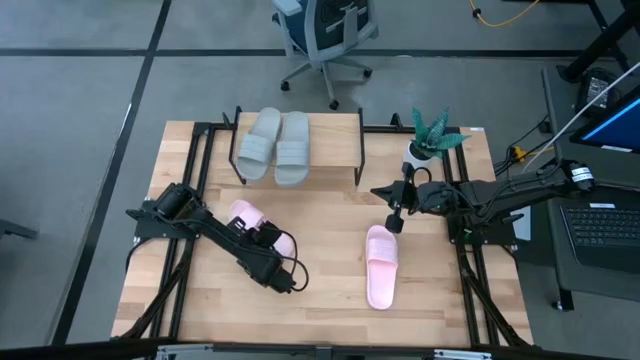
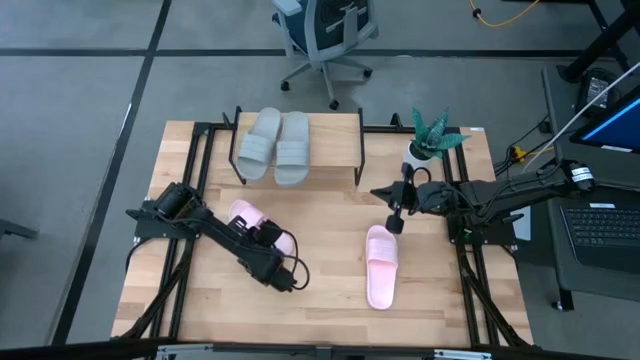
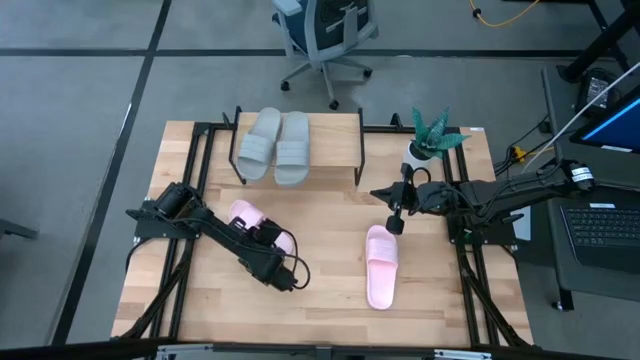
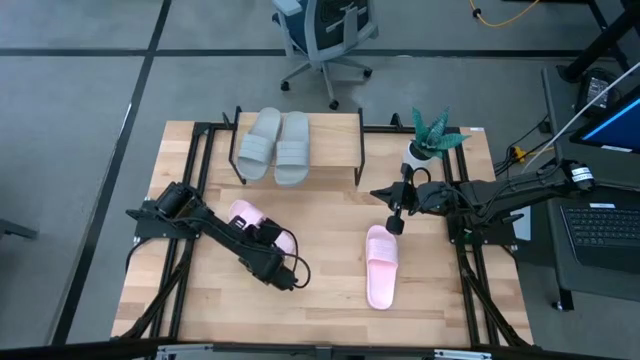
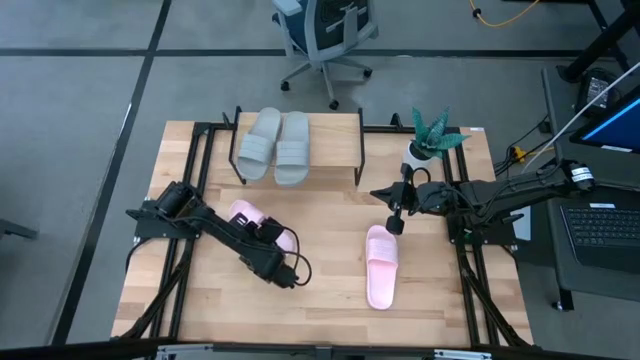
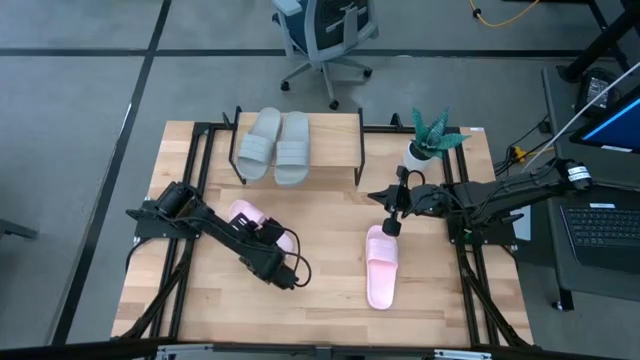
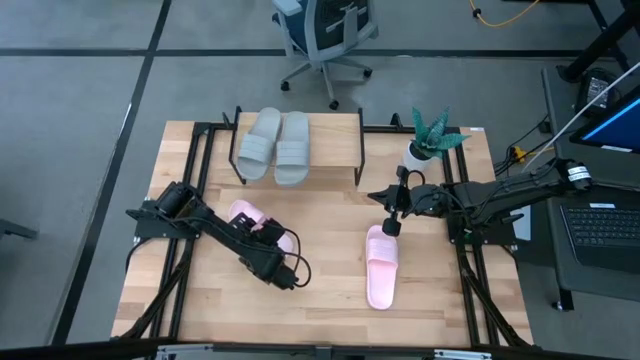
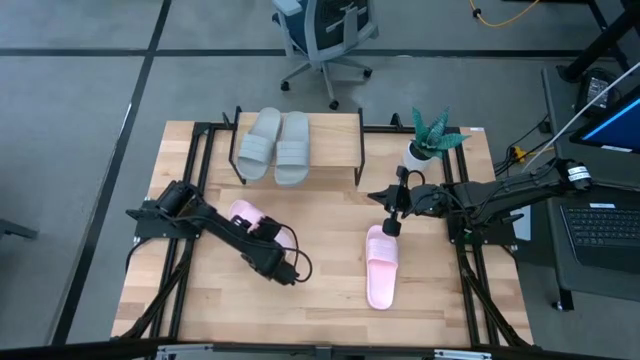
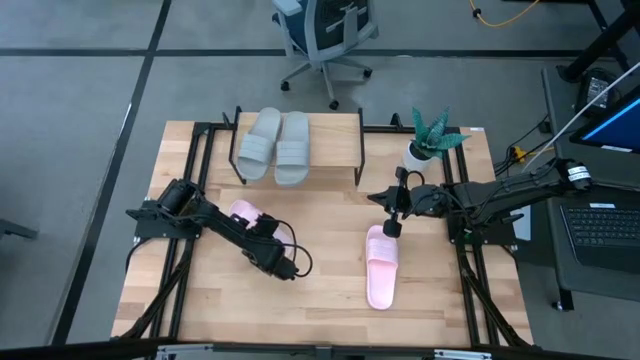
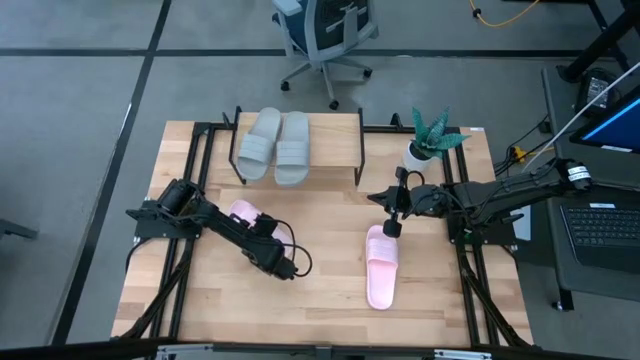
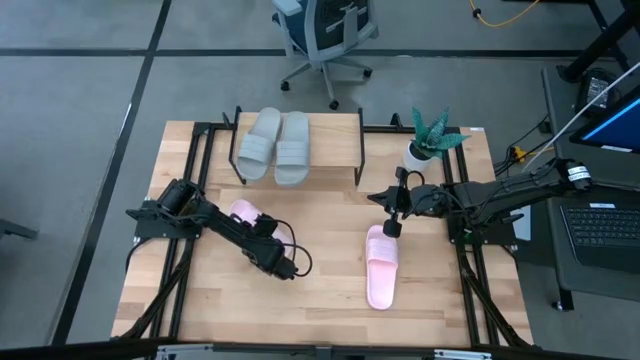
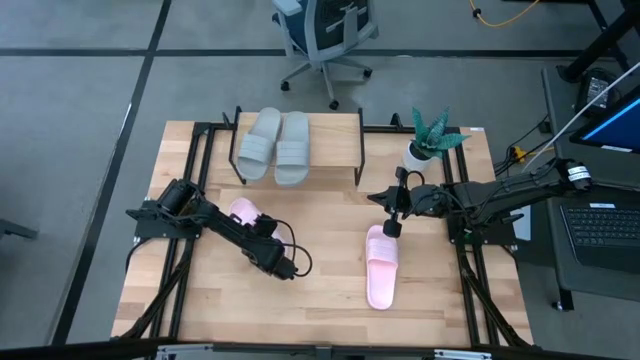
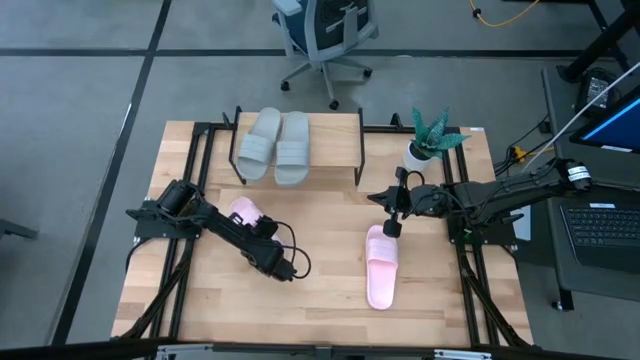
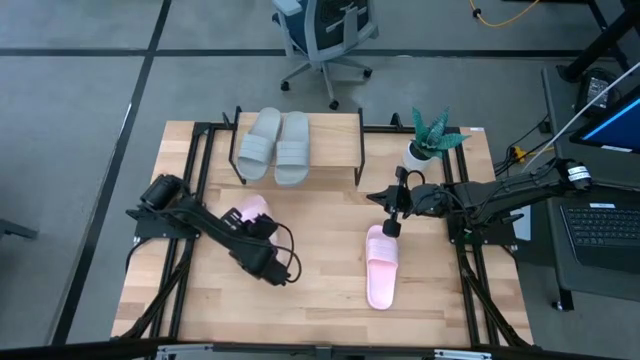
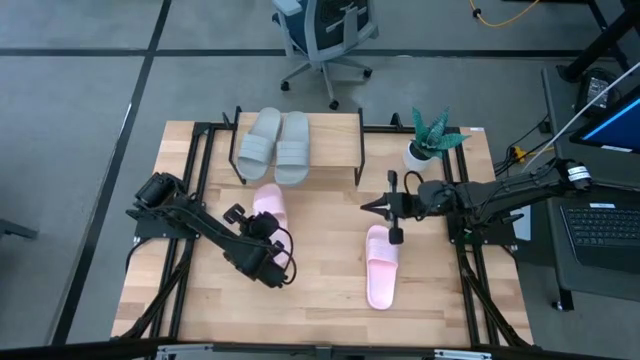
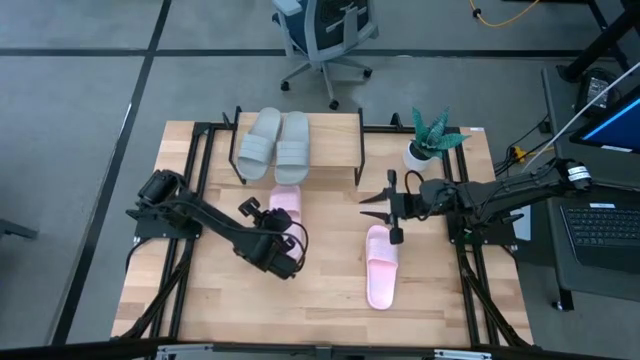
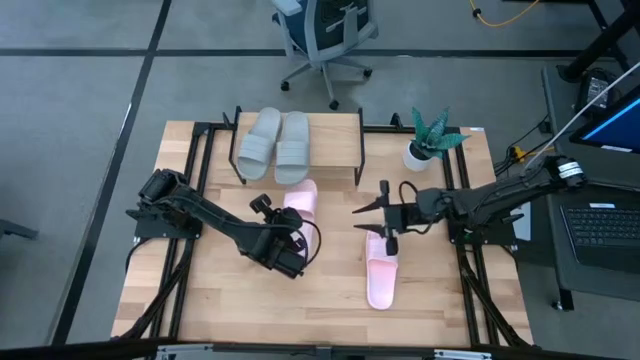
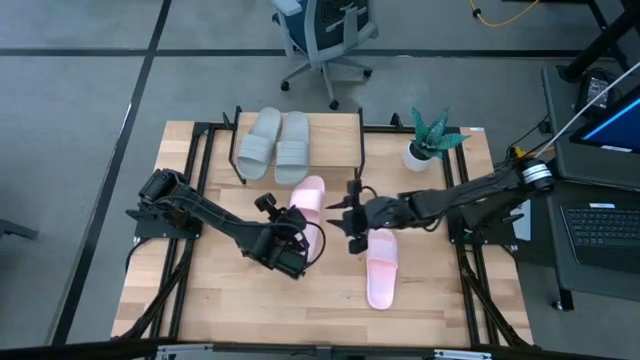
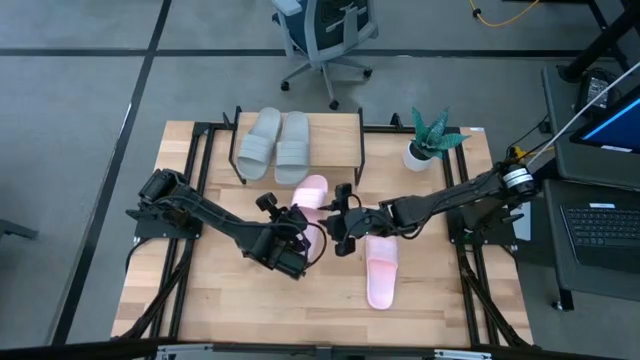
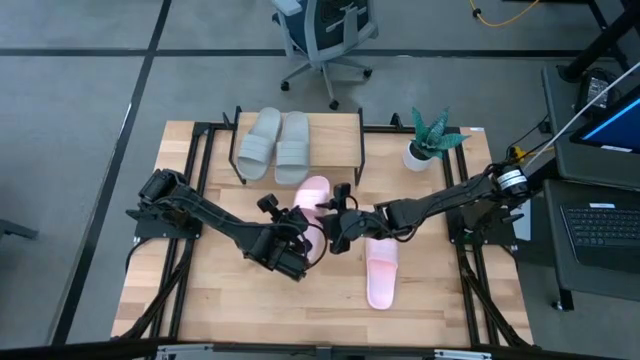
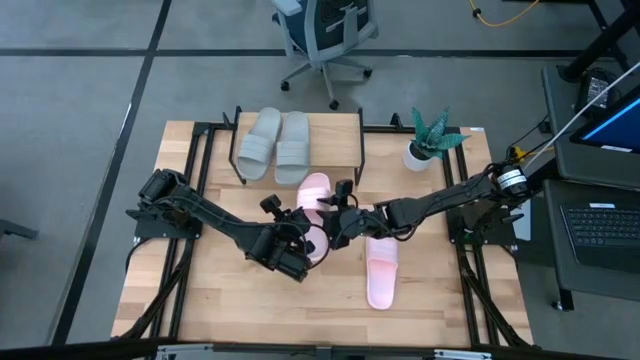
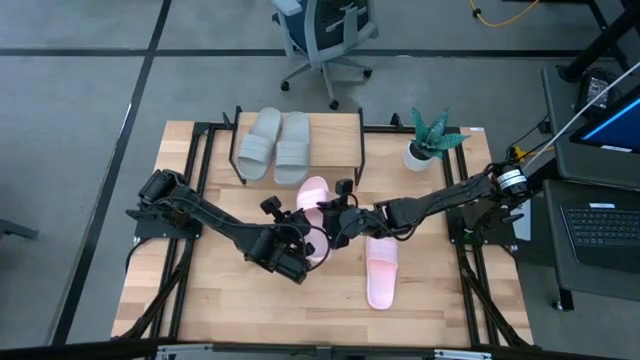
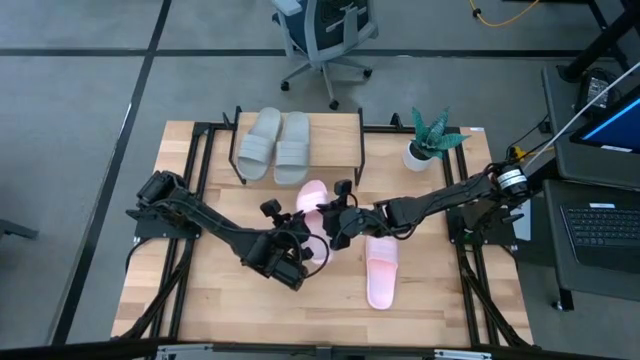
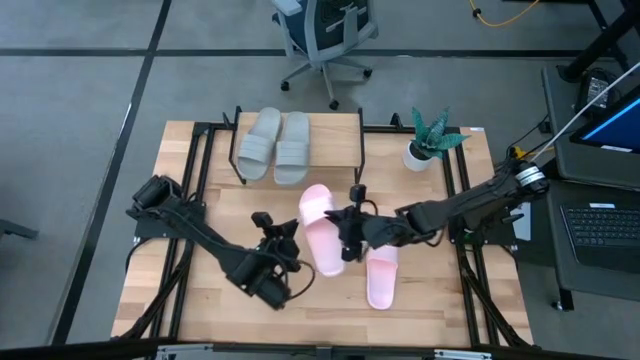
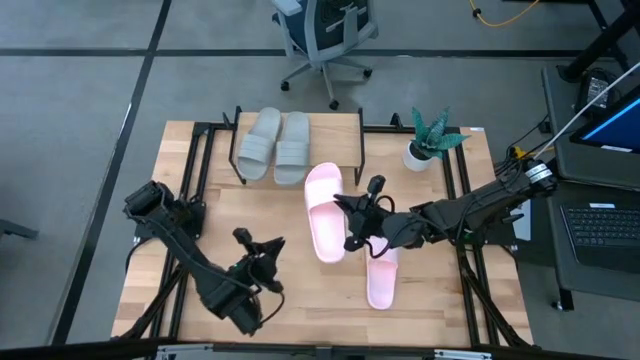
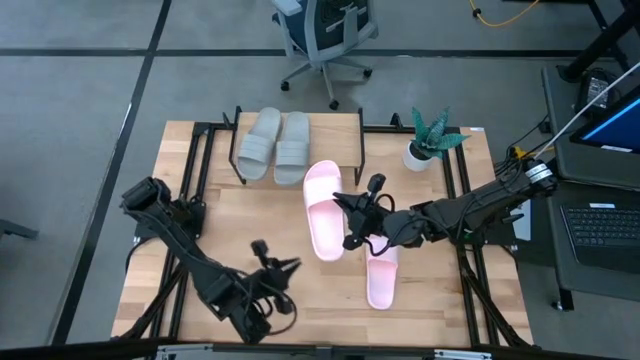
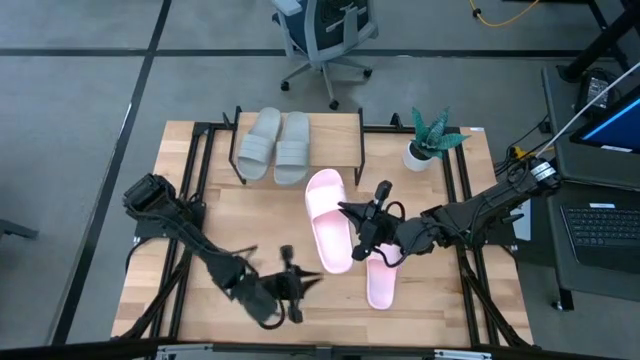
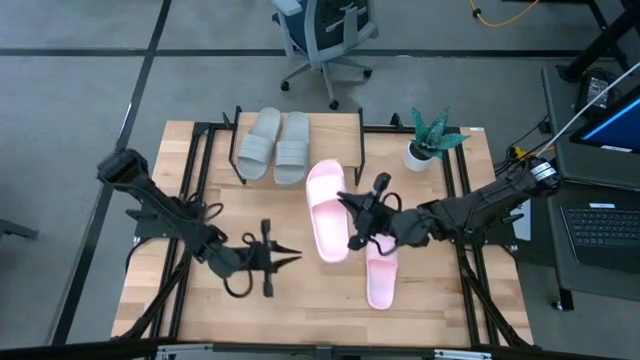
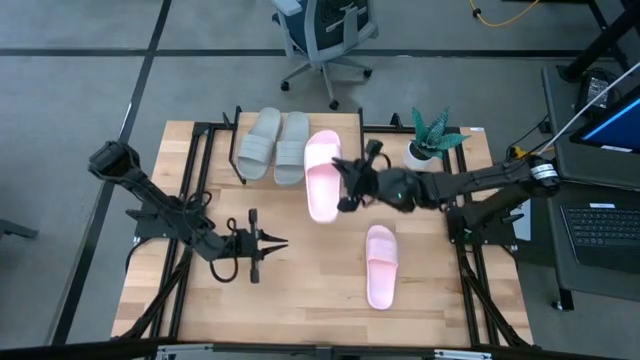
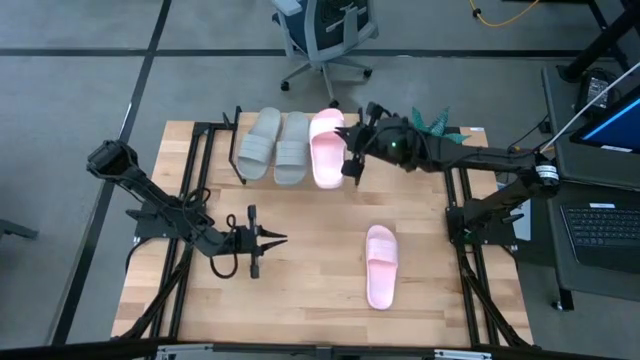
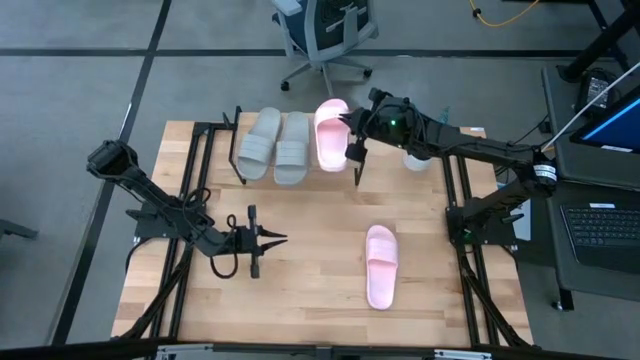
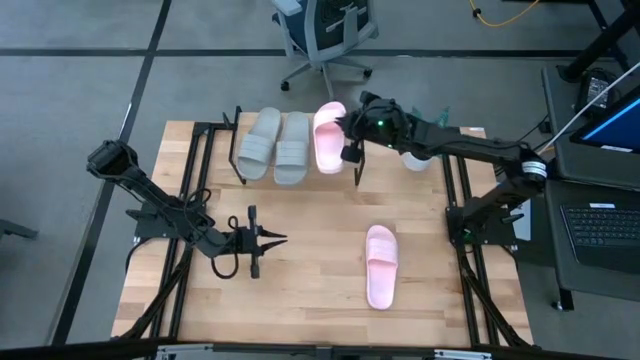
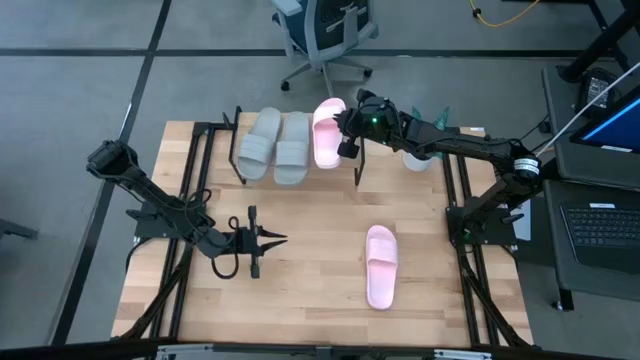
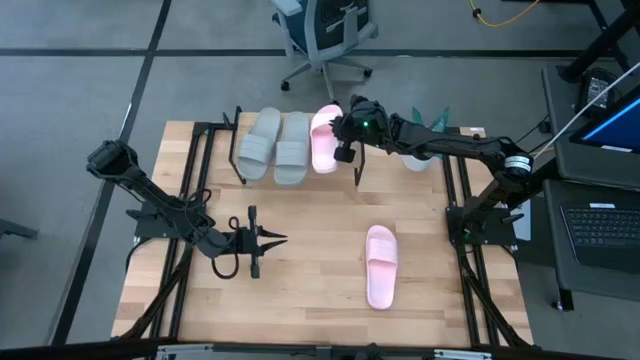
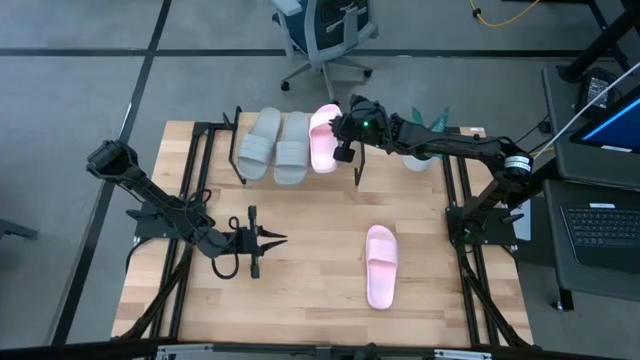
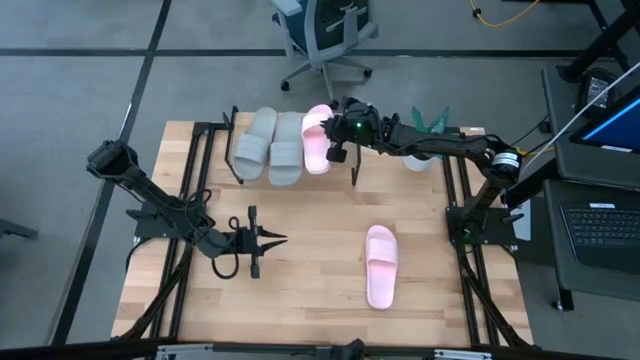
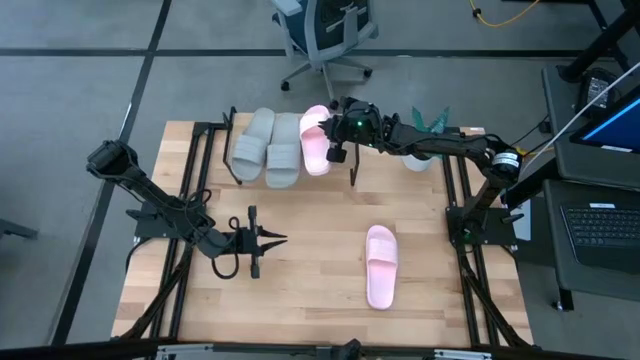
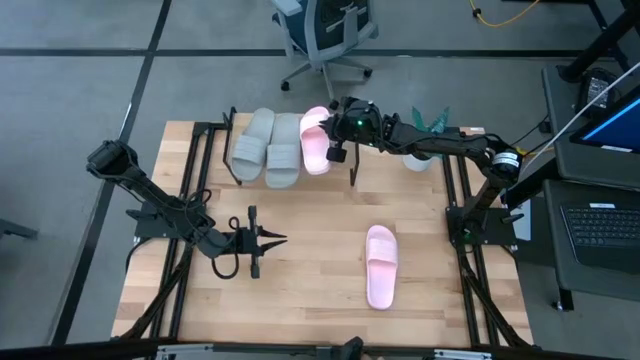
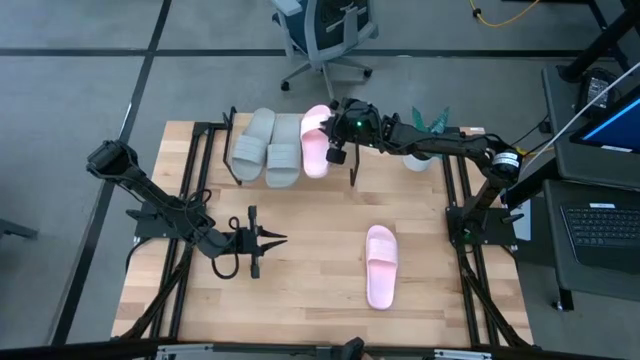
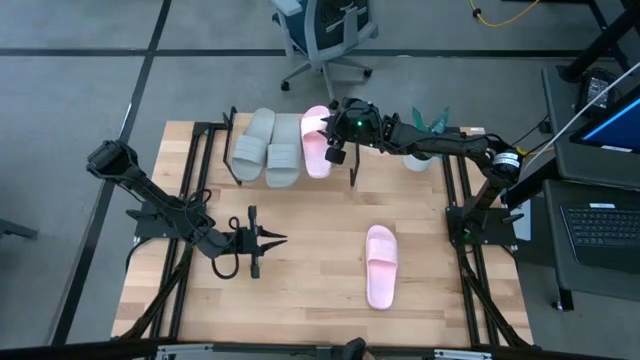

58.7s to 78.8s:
Task: Pick and place slides into the shelf
Put the left pink slipper on the shelf

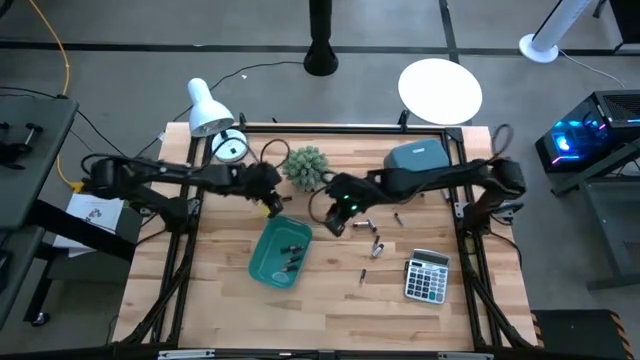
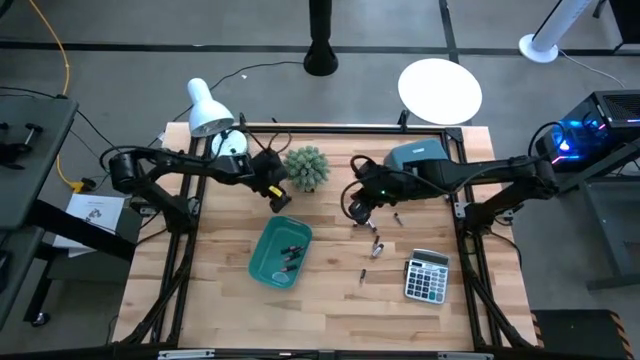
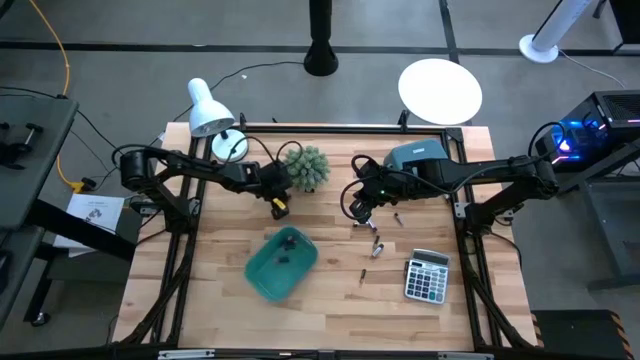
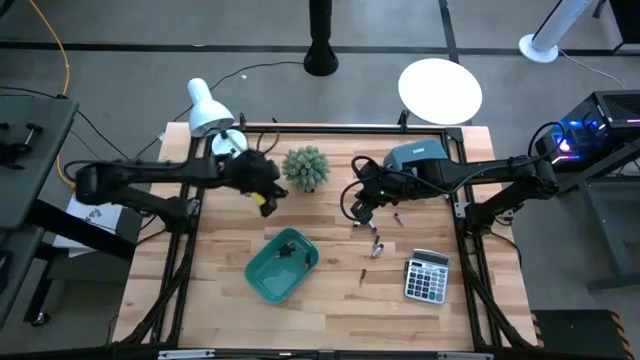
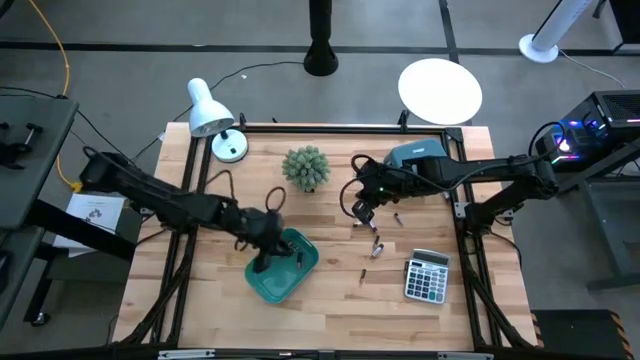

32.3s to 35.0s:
Task: Sort batteries
Put the black battery into the green bin
